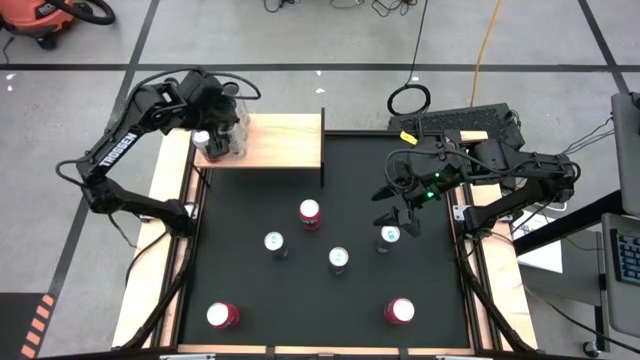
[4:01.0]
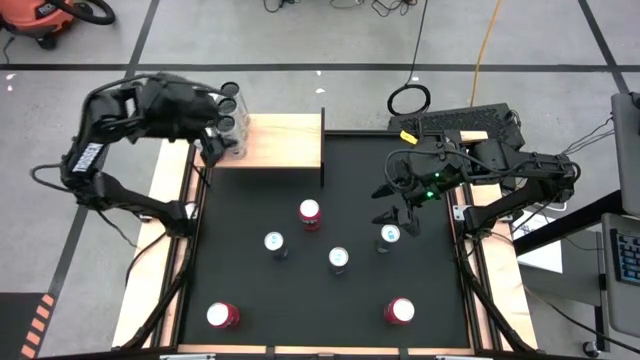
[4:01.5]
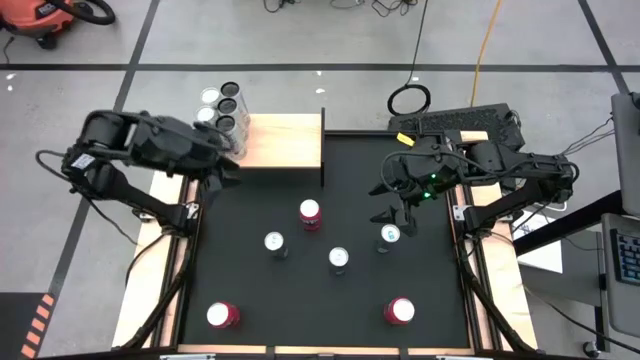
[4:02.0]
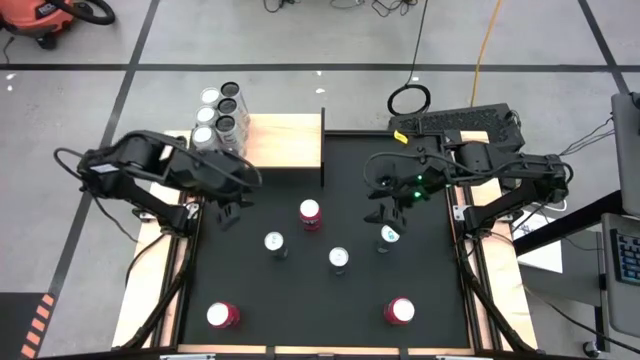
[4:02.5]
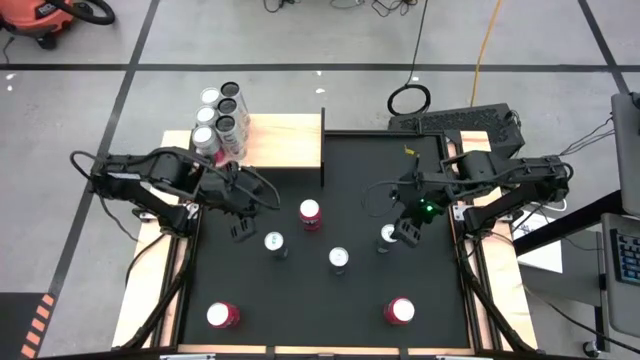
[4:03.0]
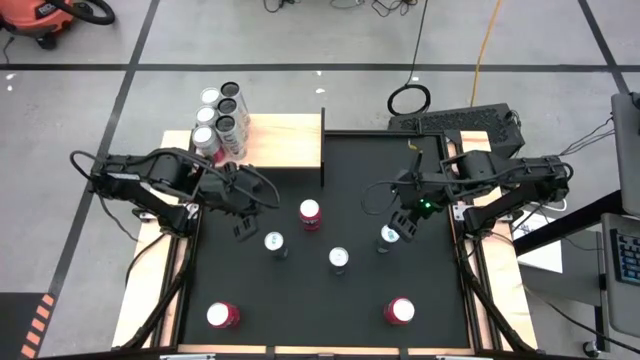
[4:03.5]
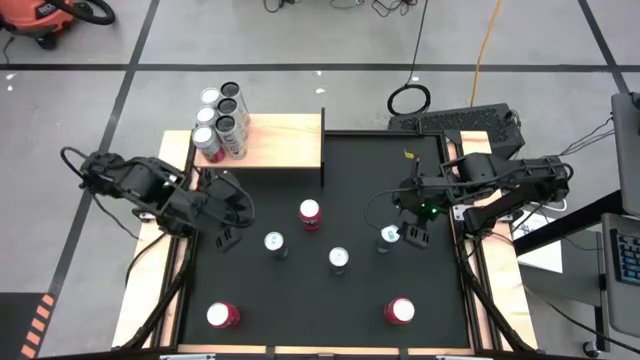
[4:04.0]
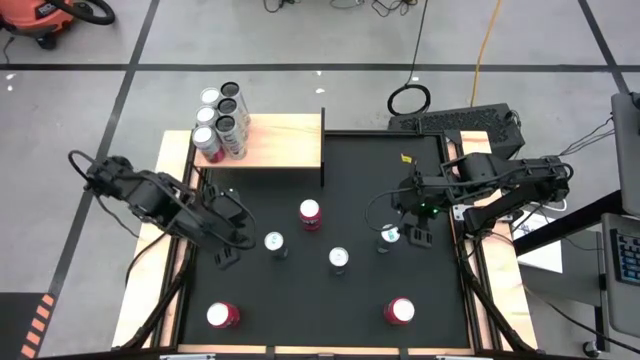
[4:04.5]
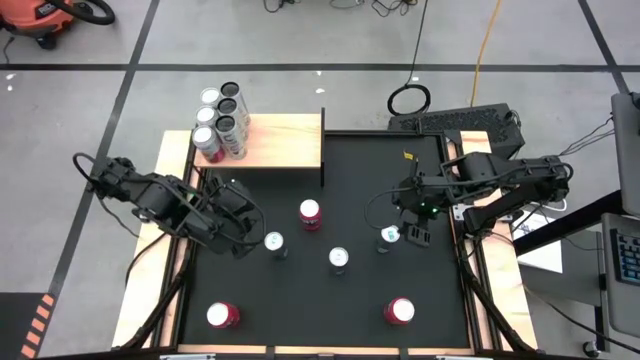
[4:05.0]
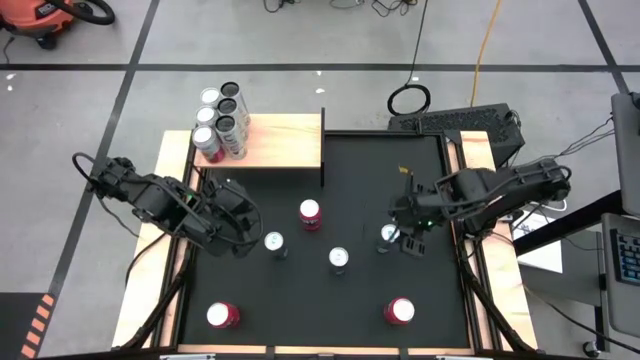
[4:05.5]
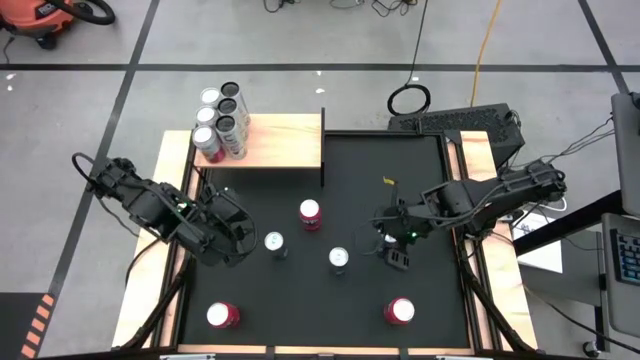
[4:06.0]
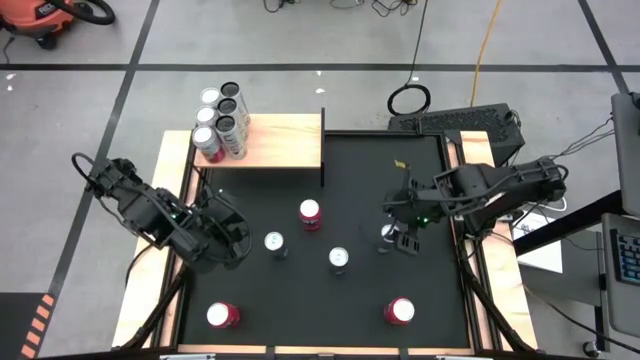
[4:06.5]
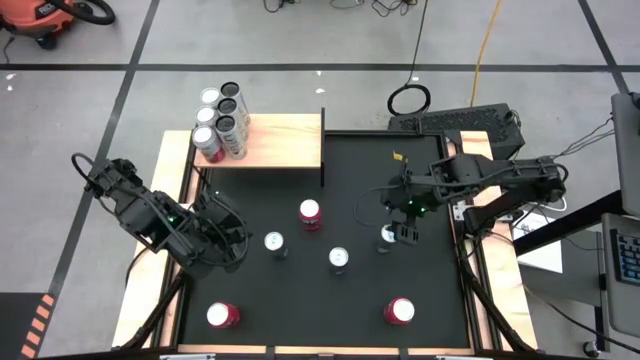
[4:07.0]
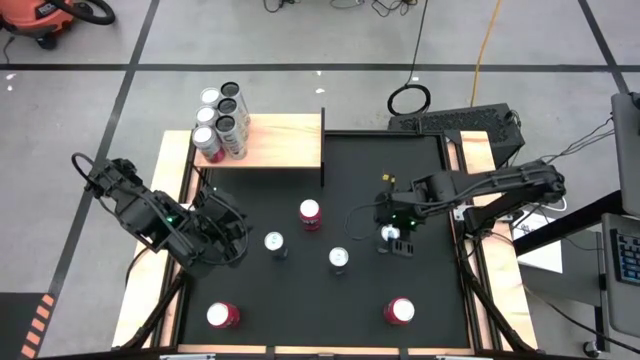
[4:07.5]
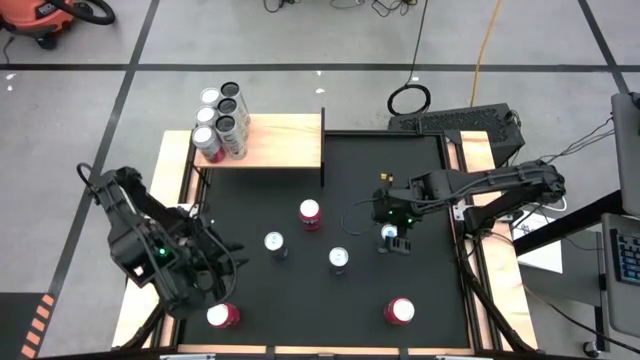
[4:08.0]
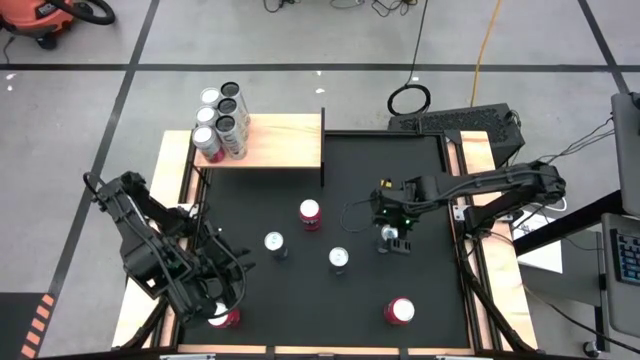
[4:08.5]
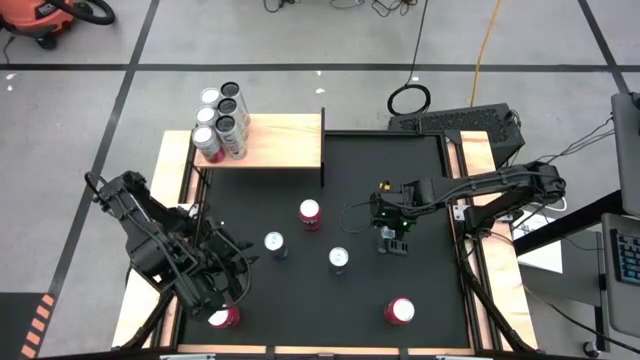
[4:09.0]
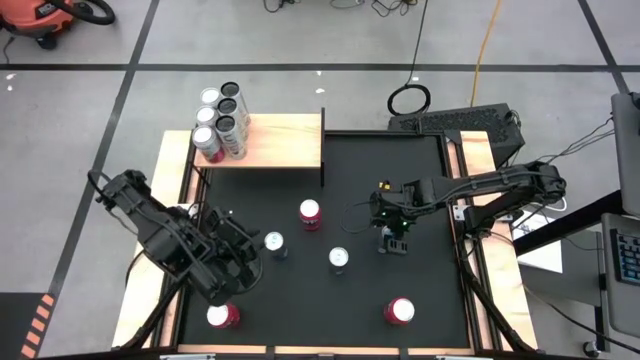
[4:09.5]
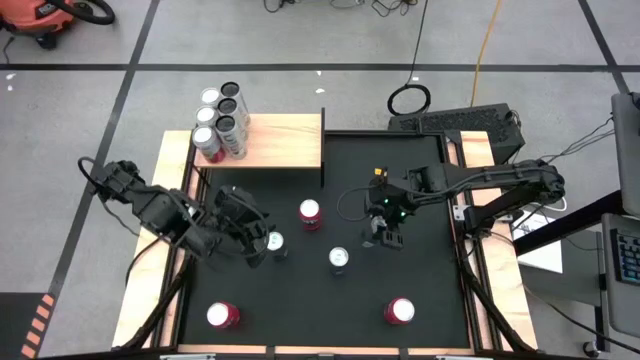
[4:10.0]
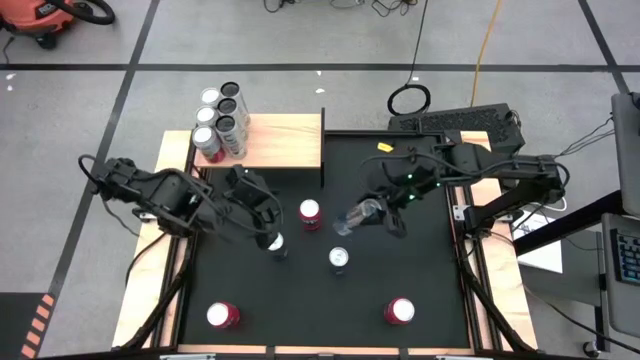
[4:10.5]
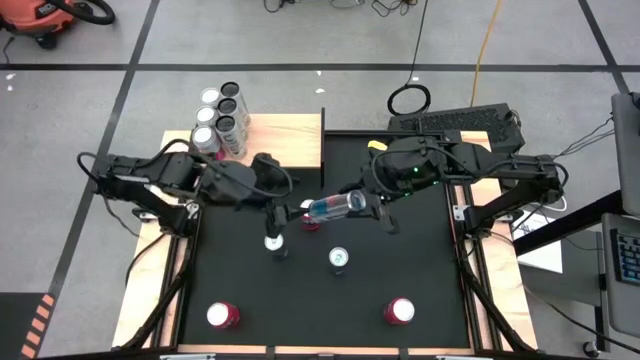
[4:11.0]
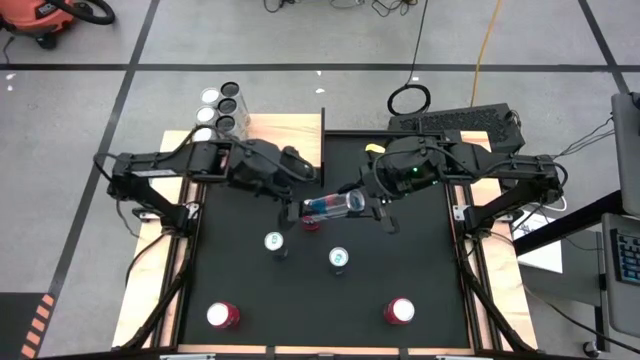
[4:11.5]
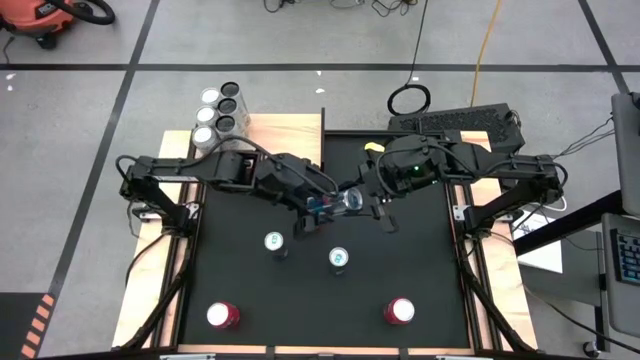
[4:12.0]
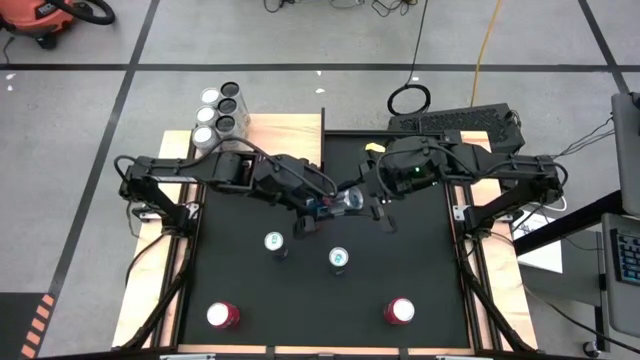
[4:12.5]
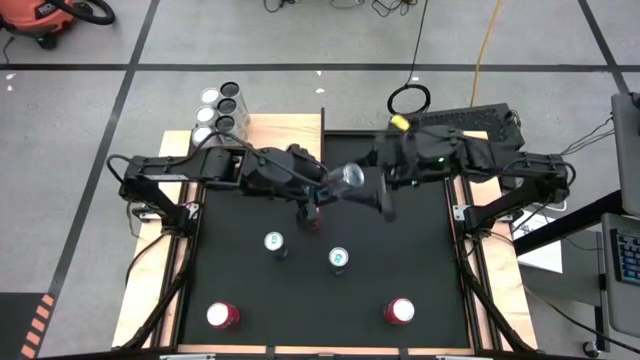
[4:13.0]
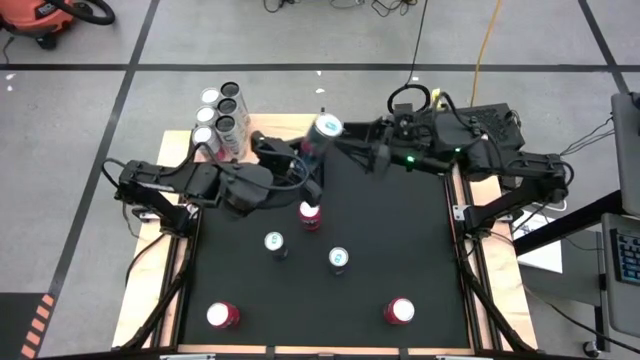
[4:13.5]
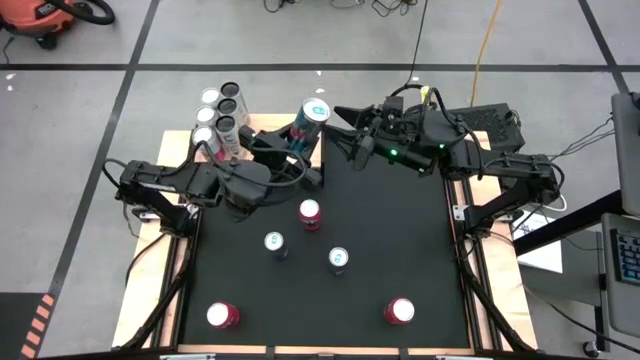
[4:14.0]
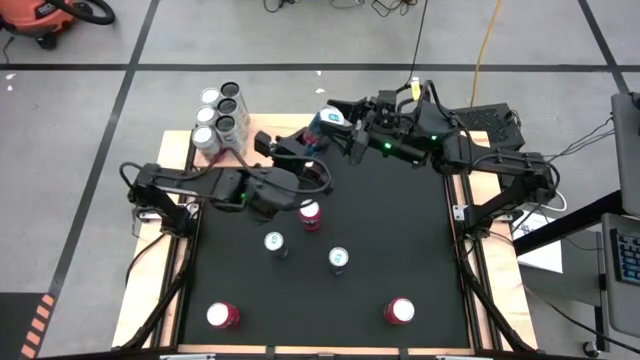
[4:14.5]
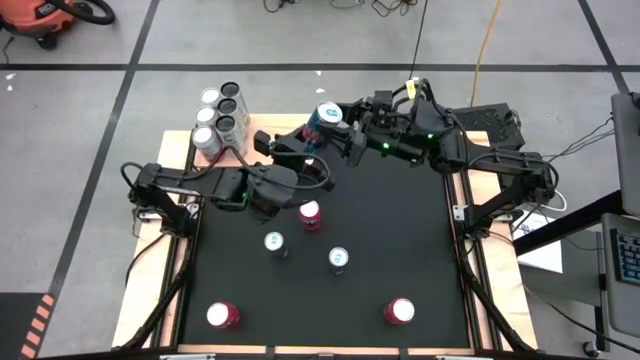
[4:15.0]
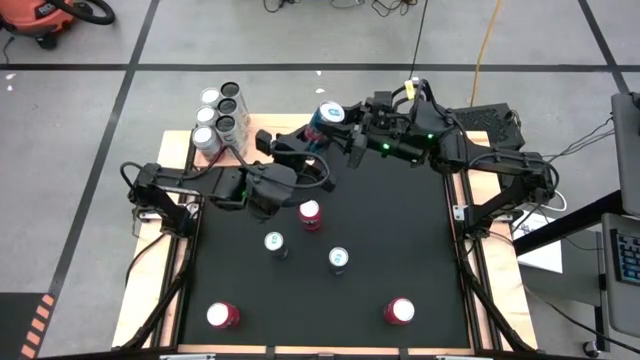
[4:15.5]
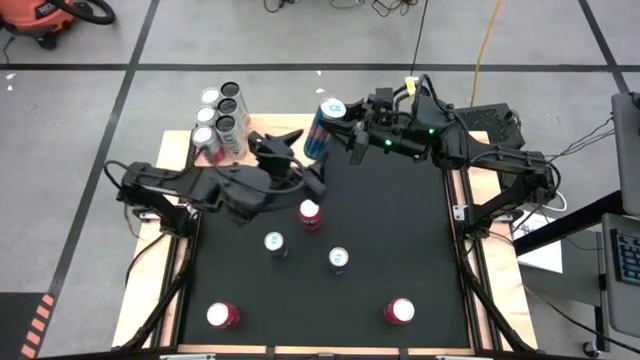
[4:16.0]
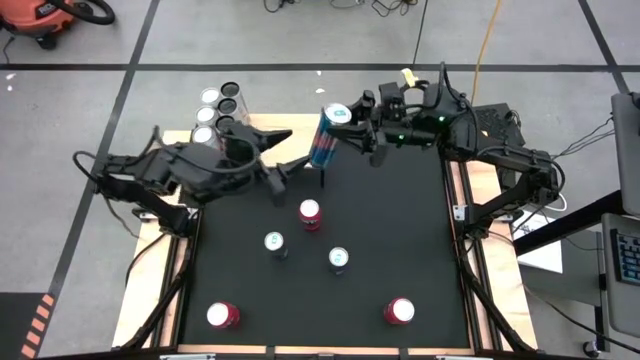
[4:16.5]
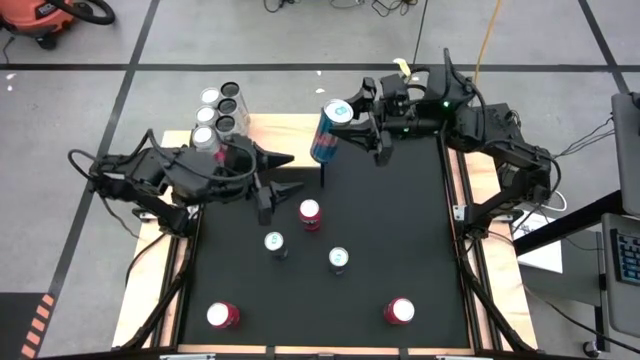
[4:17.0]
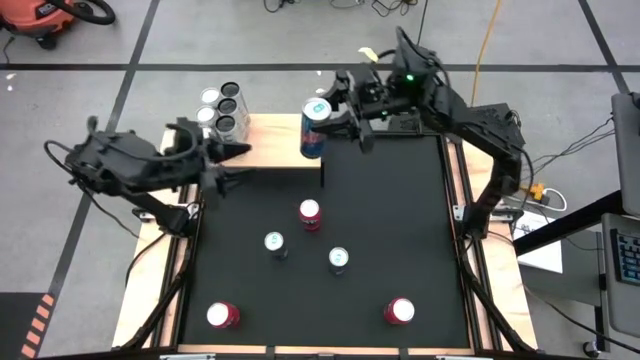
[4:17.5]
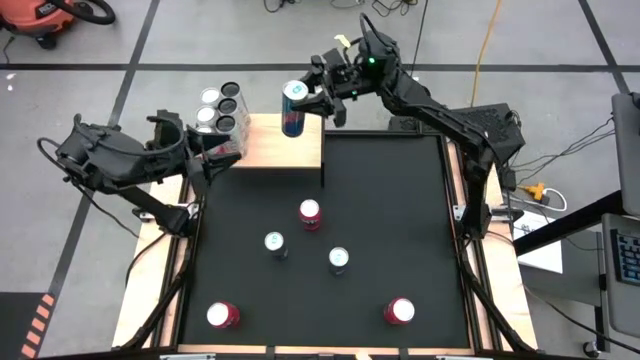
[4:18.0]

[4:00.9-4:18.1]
Task: Place canned beverage on shelf
Put the top right blue soda can on the shelf

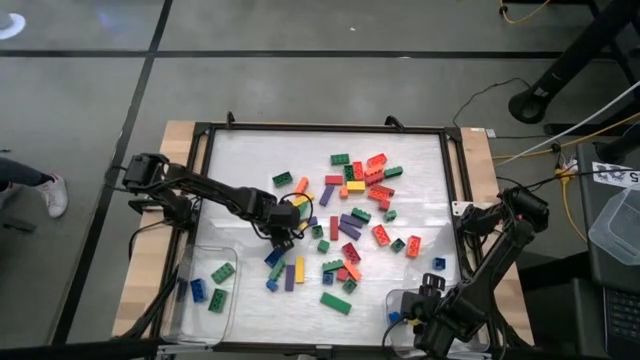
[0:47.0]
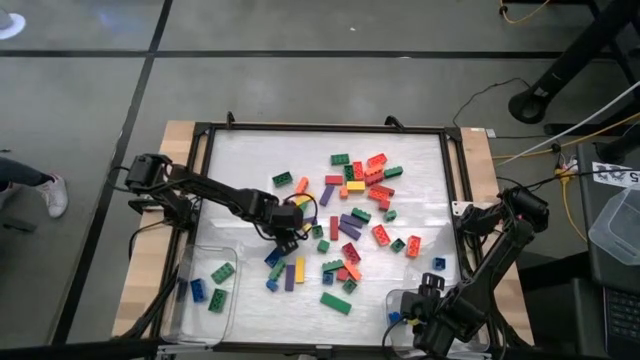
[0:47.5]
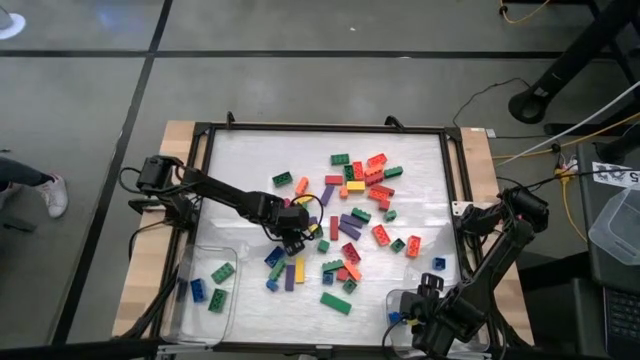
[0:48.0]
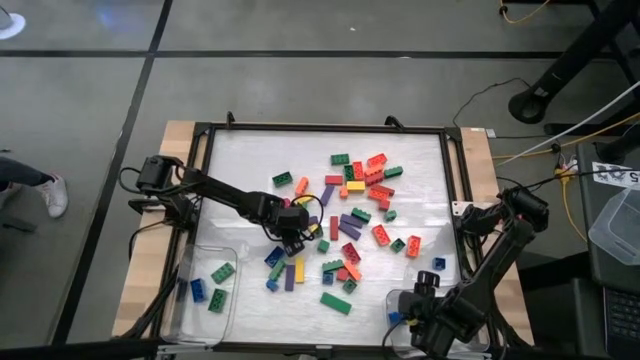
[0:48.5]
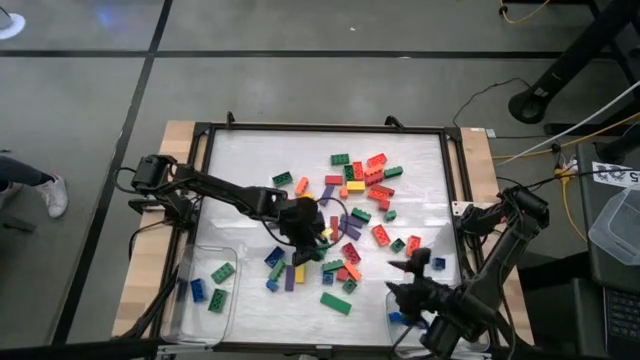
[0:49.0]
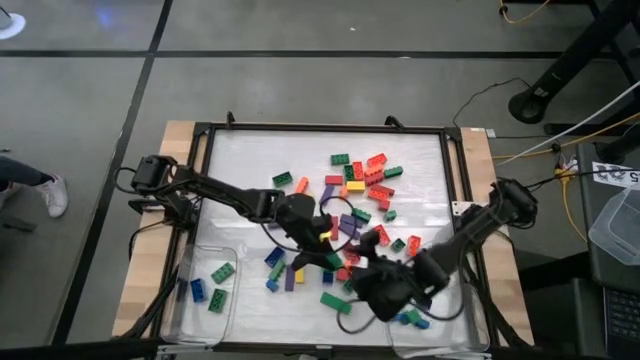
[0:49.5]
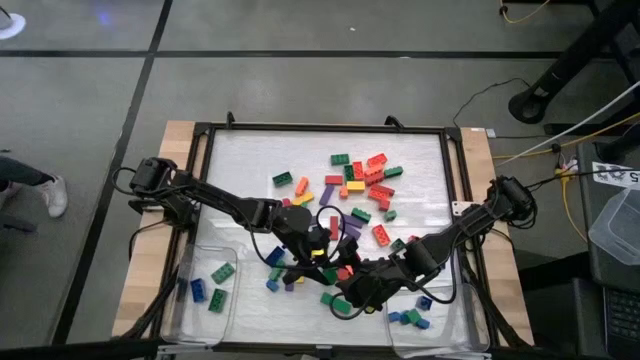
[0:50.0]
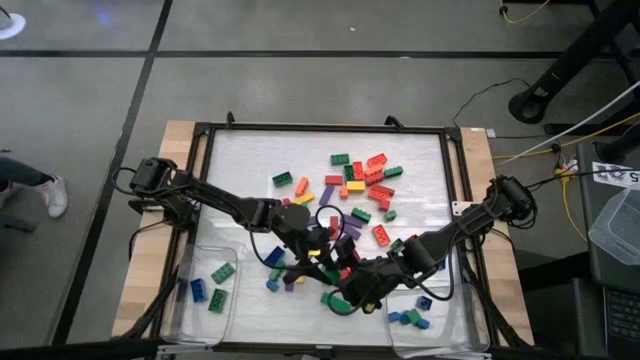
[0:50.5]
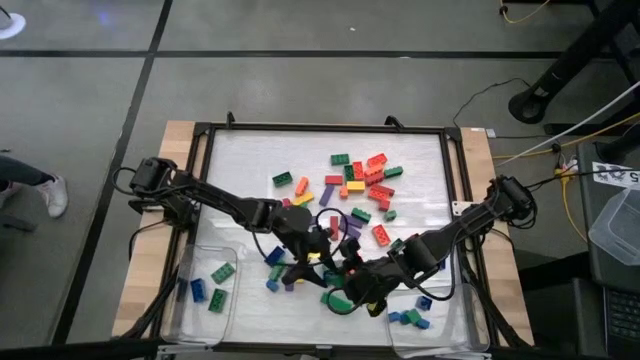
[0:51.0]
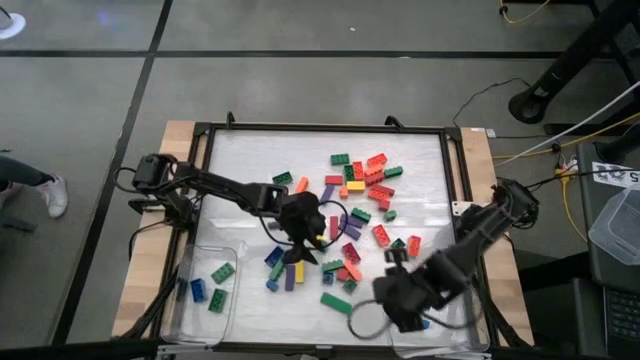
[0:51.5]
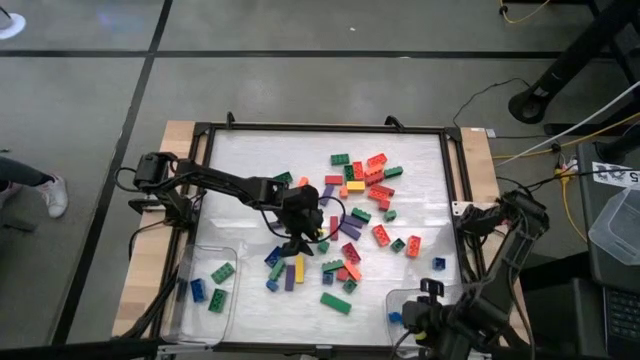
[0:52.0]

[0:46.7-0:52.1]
Task: Sort blocks by size
Put the small green block into the right transparent bin
